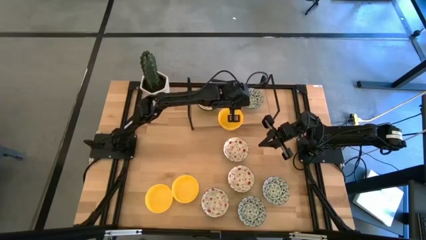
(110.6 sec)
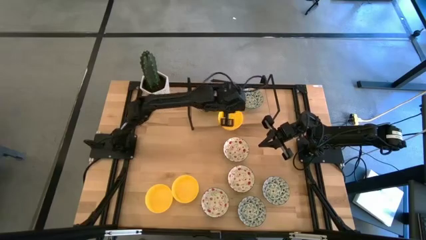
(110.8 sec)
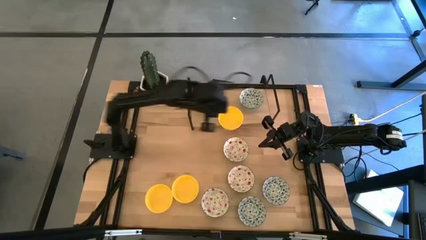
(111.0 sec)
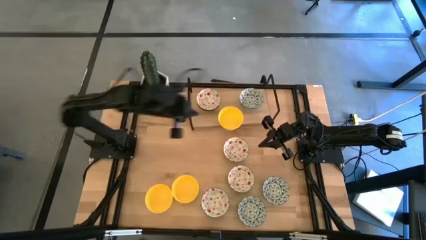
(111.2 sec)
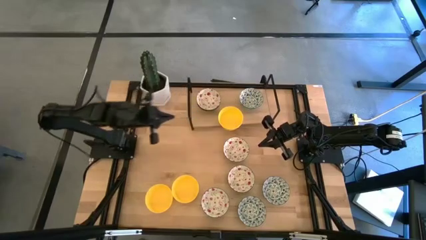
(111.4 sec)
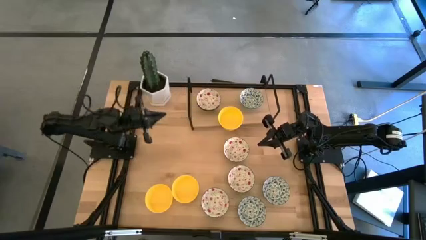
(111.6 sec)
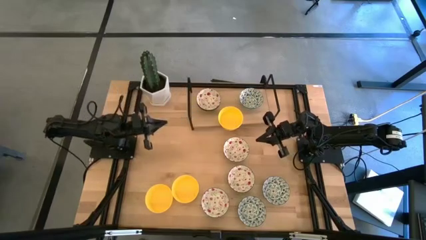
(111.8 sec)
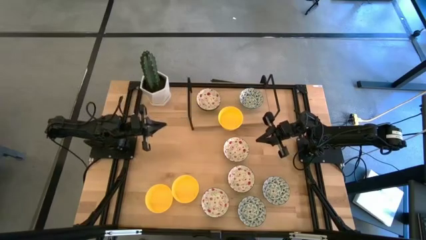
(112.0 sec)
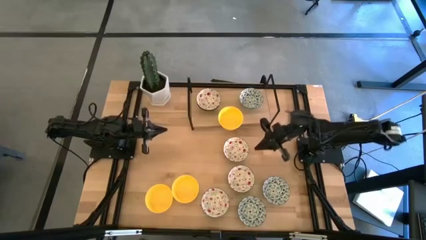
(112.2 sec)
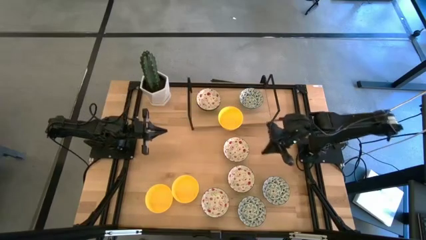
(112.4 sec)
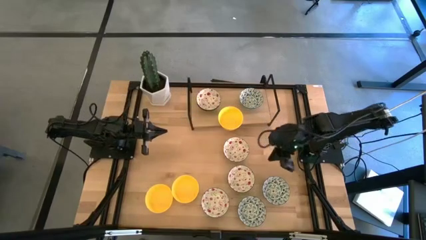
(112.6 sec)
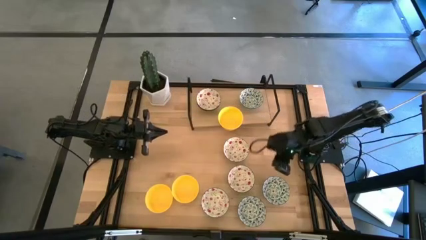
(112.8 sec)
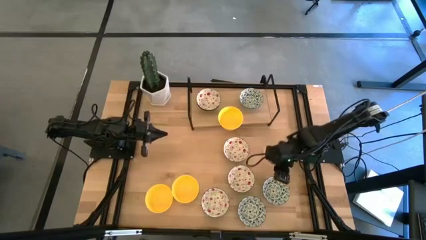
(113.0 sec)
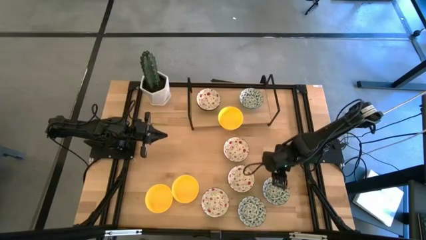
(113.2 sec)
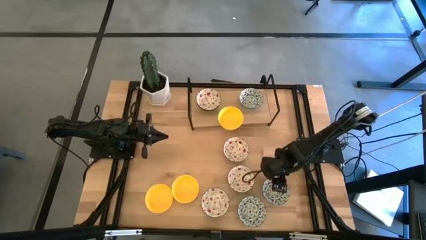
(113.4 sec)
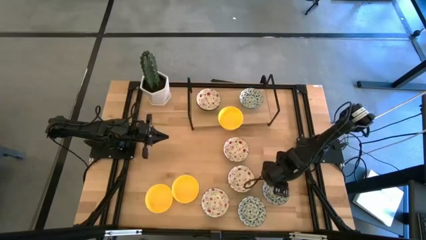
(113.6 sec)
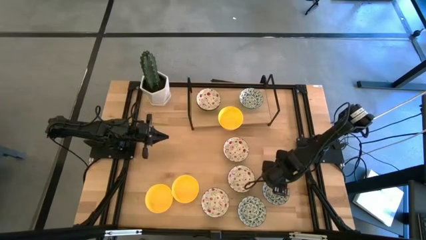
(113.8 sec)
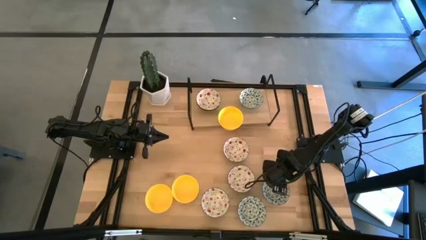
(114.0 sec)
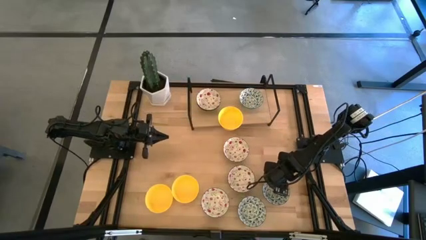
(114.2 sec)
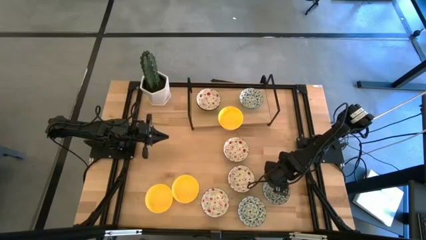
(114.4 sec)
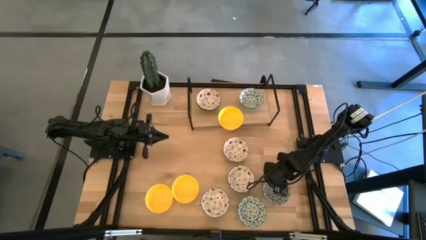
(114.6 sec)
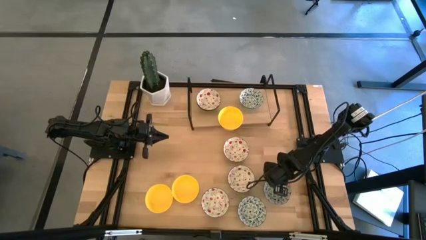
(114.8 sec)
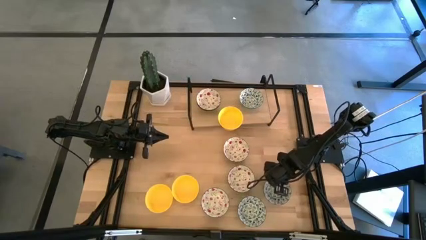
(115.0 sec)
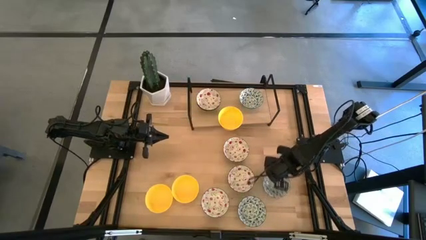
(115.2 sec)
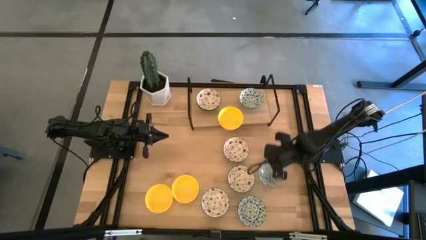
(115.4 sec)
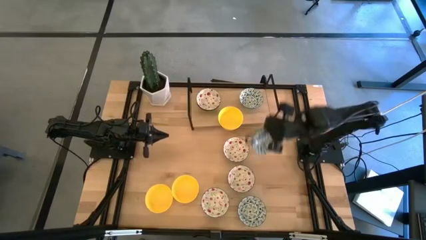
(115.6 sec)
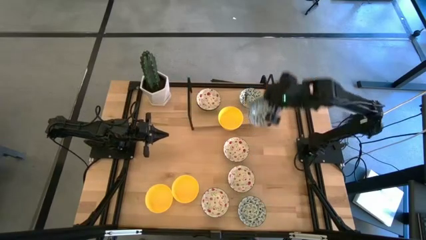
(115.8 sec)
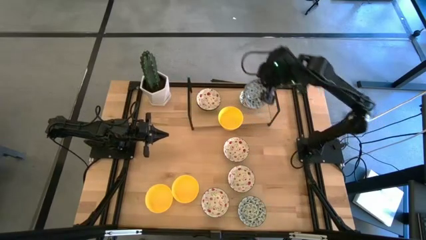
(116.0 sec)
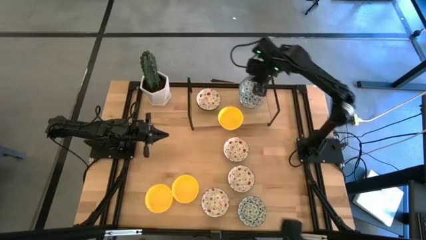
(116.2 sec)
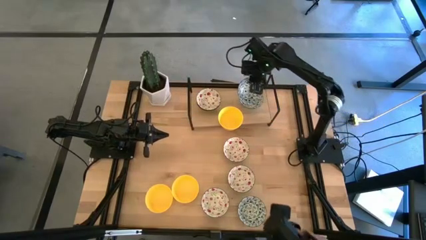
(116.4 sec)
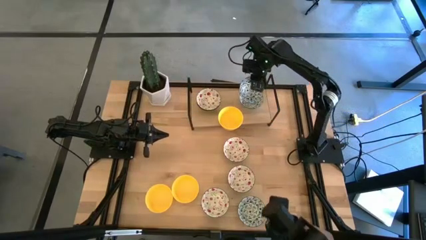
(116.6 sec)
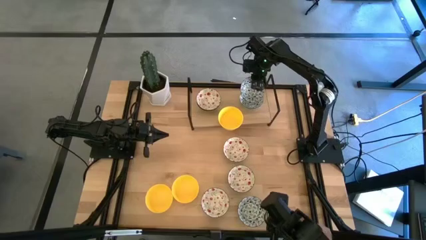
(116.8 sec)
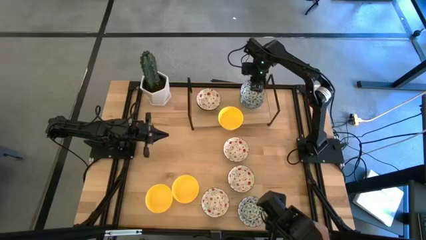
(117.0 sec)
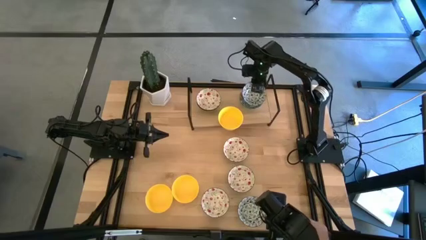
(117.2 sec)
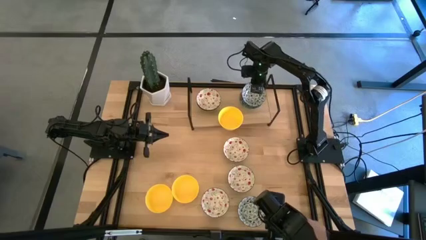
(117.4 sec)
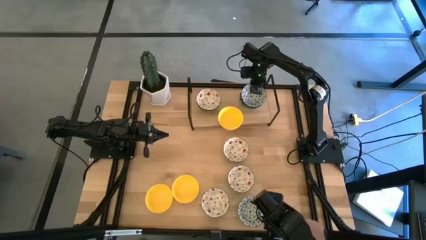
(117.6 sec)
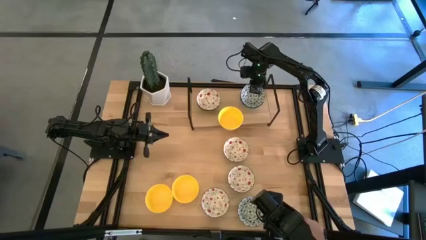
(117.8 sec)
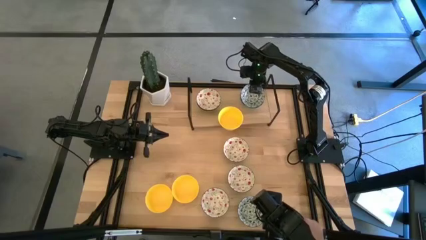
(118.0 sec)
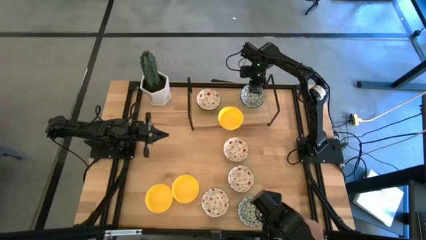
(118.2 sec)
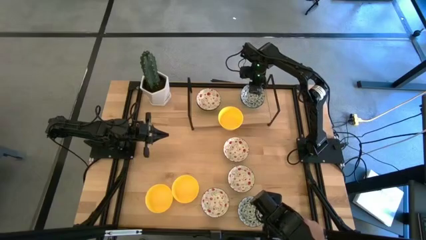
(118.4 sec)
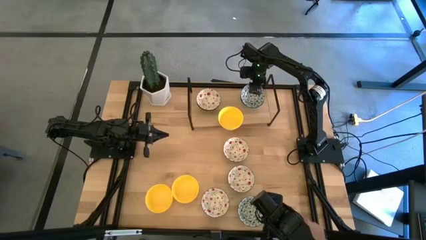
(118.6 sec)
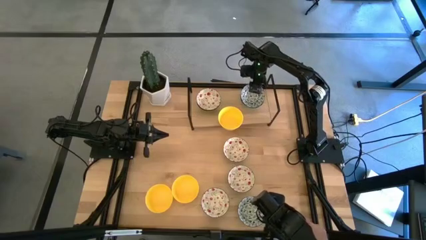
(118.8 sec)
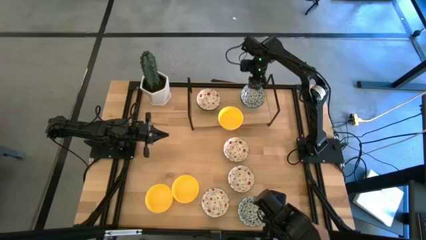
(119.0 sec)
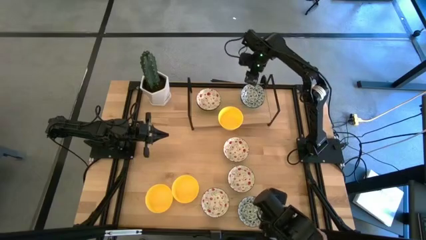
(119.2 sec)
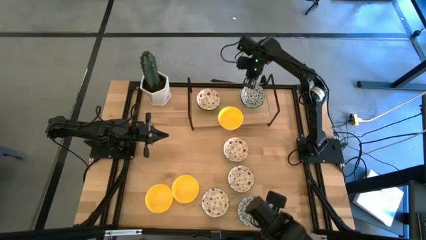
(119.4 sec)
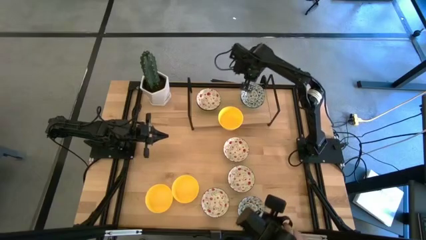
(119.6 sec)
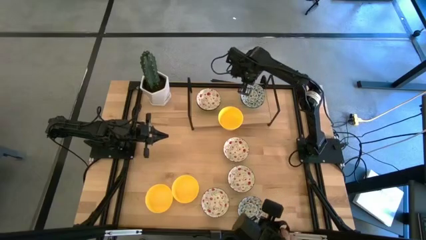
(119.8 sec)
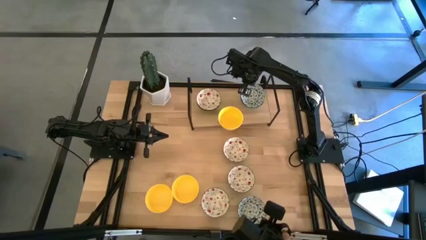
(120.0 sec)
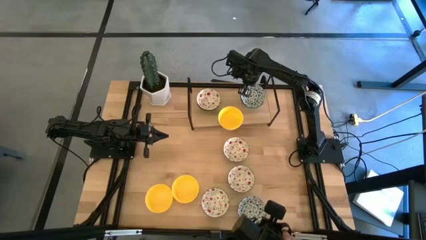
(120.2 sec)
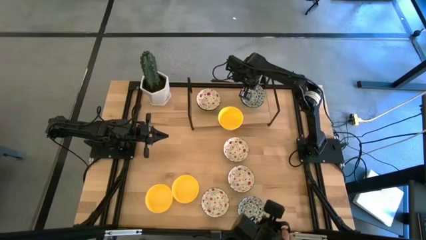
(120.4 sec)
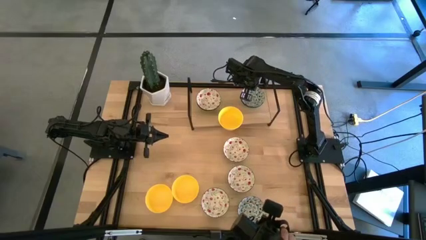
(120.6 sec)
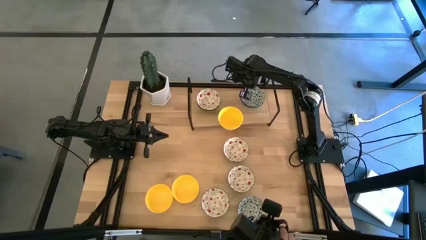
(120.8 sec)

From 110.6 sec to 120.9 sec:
Task: Pick & Place Mini bowls
Stack the blue patterned bowl on top of the blue patterned bowl on the shelf
